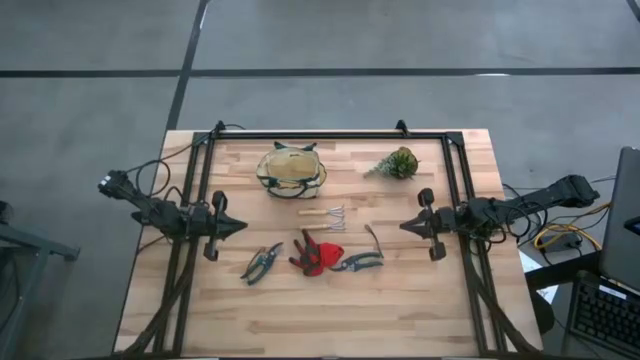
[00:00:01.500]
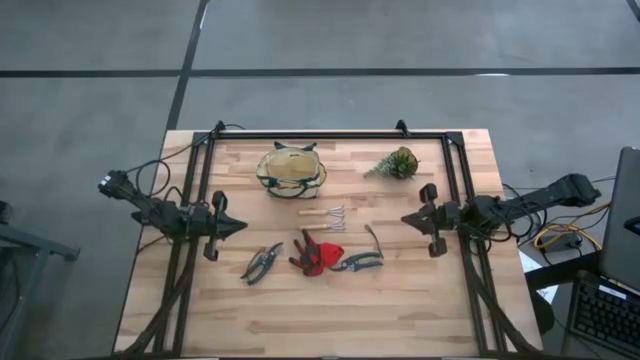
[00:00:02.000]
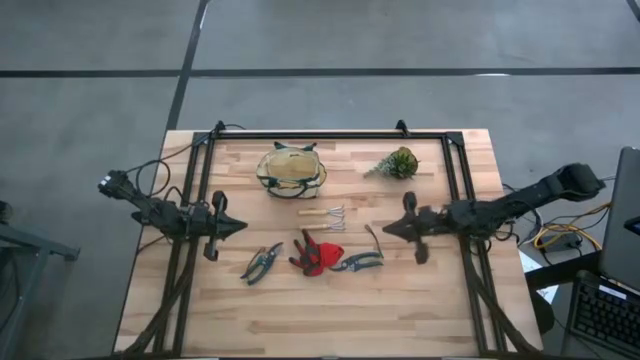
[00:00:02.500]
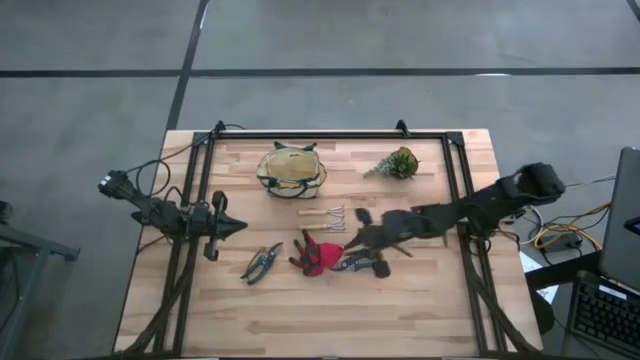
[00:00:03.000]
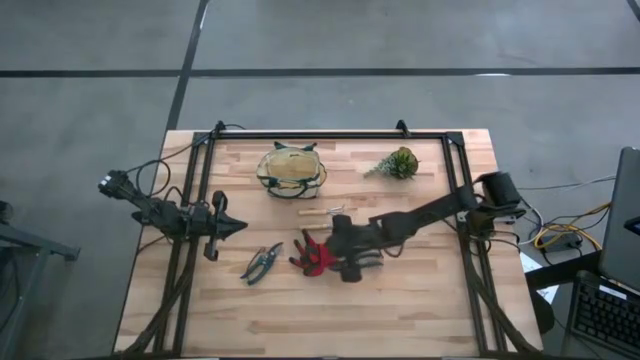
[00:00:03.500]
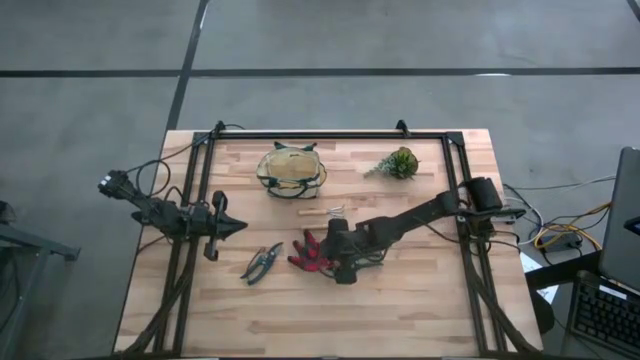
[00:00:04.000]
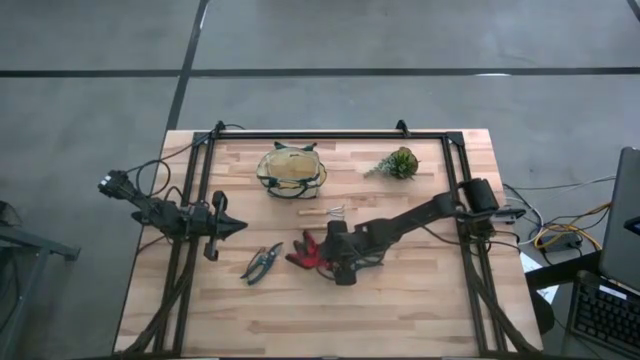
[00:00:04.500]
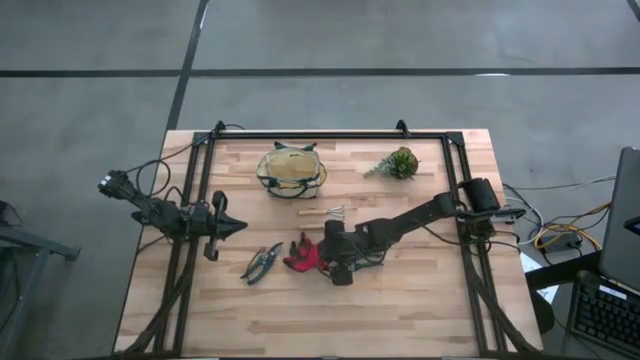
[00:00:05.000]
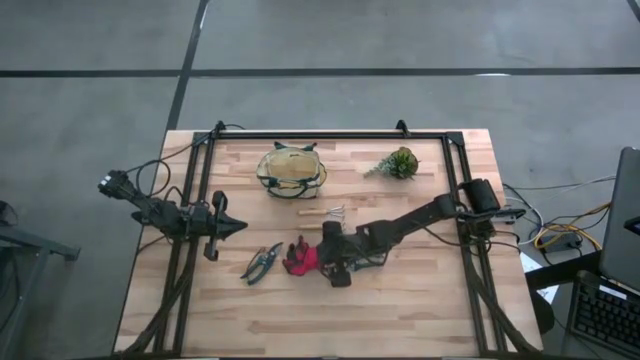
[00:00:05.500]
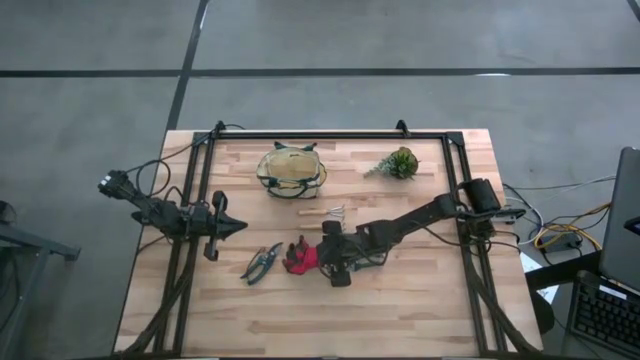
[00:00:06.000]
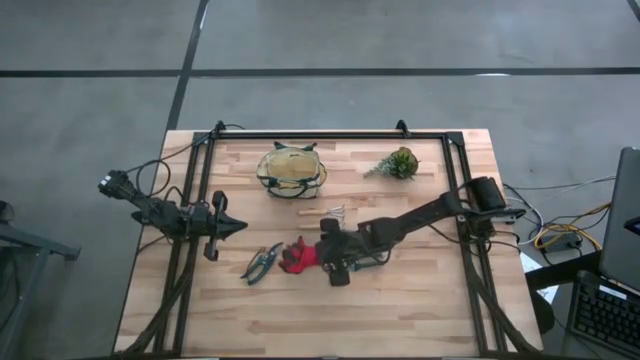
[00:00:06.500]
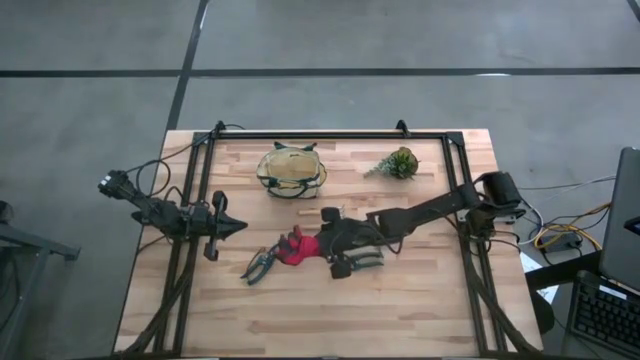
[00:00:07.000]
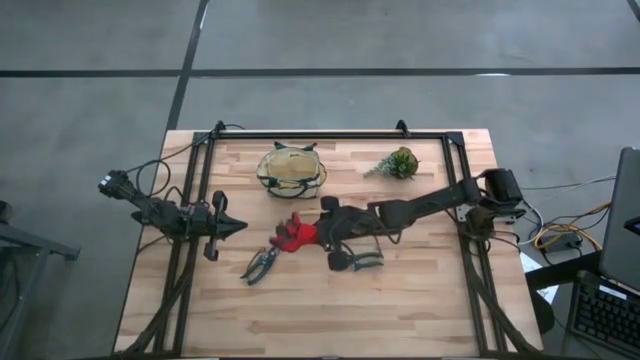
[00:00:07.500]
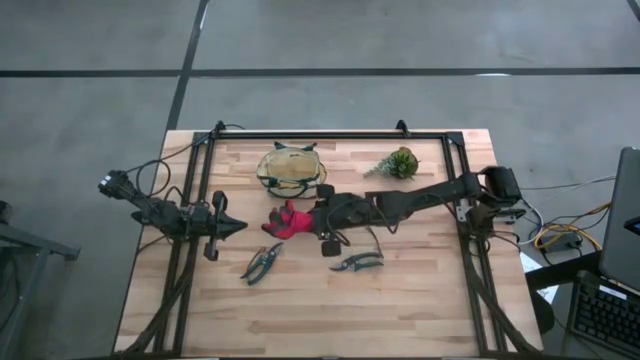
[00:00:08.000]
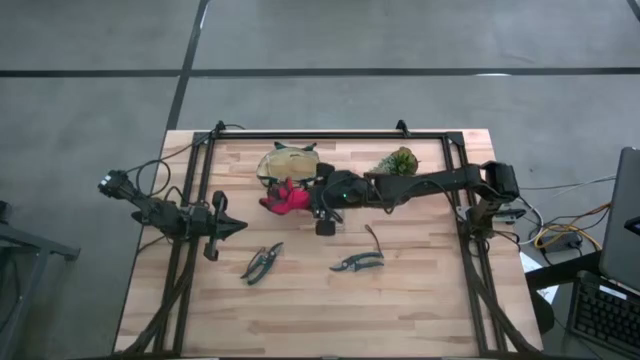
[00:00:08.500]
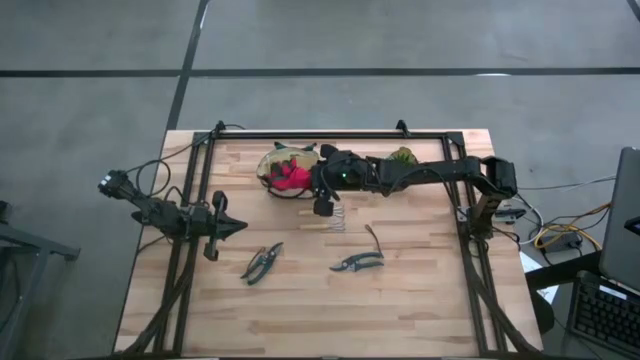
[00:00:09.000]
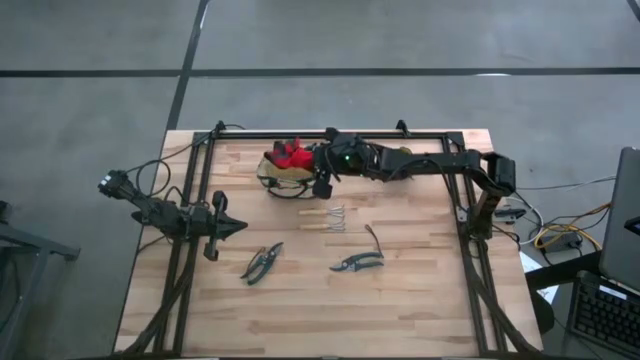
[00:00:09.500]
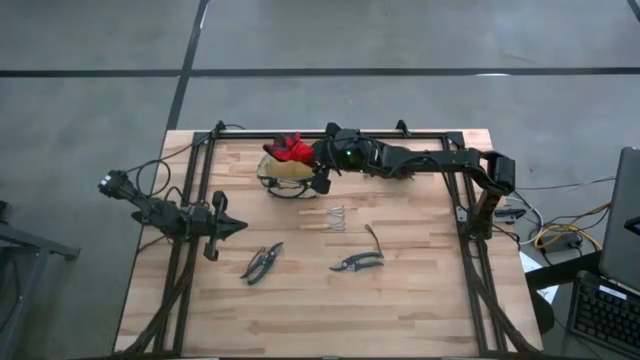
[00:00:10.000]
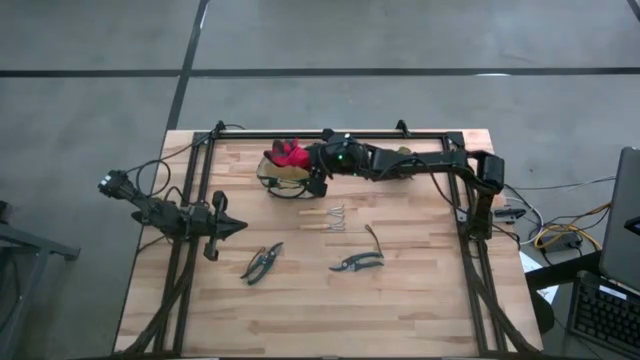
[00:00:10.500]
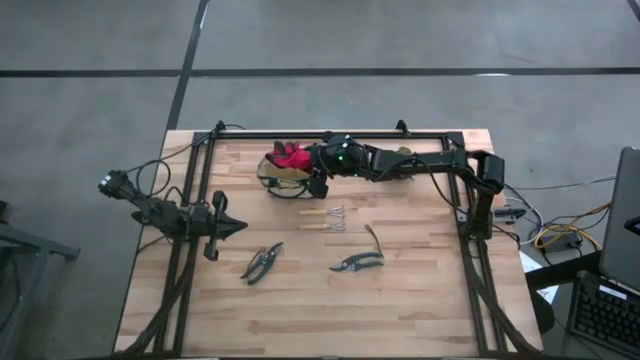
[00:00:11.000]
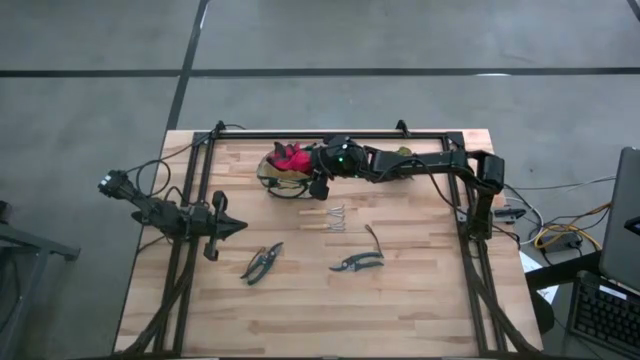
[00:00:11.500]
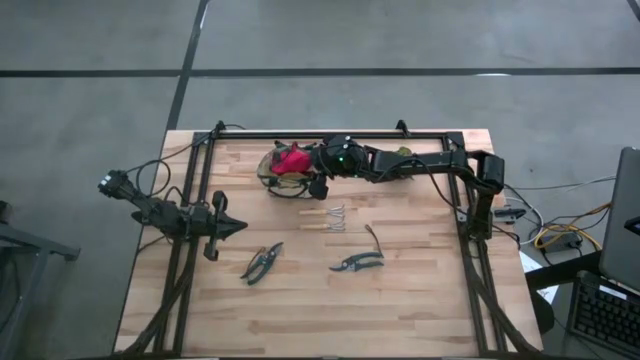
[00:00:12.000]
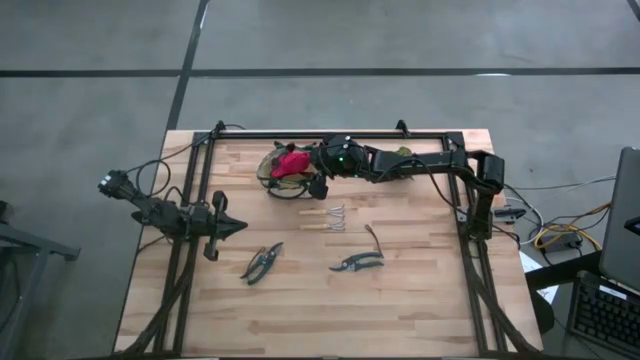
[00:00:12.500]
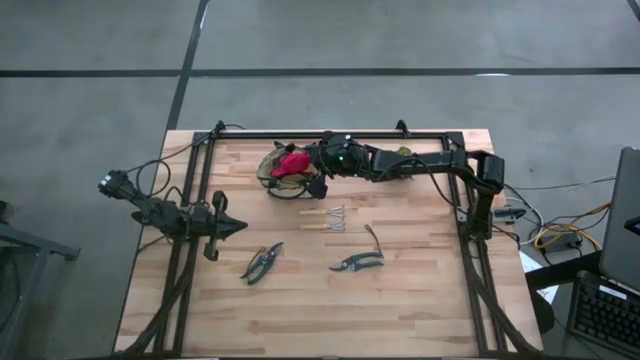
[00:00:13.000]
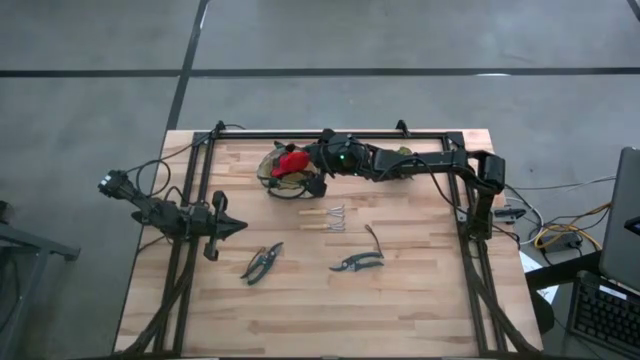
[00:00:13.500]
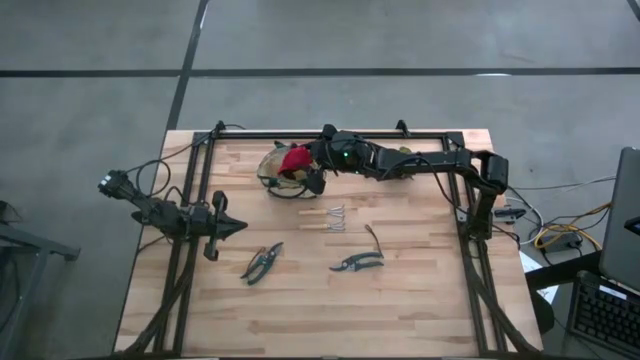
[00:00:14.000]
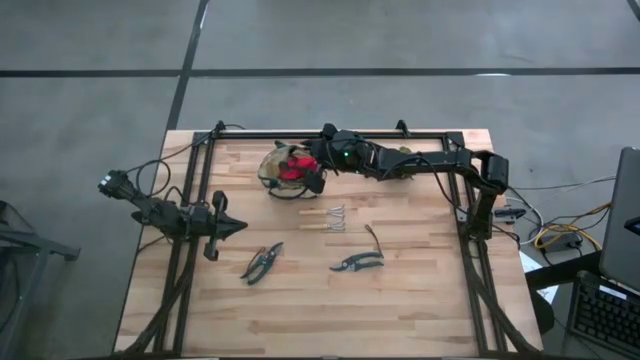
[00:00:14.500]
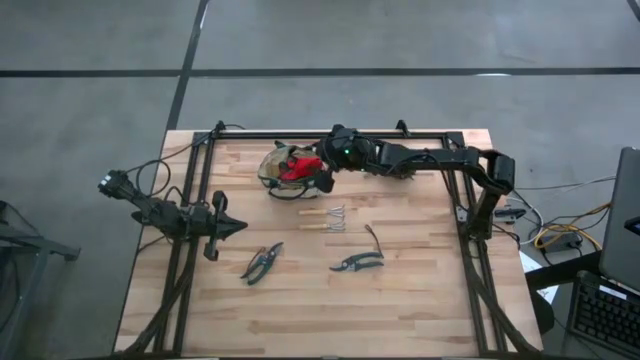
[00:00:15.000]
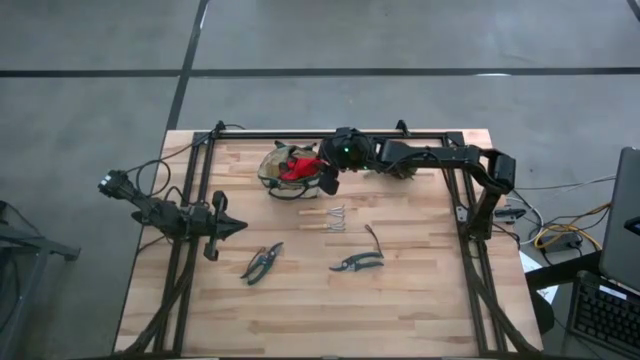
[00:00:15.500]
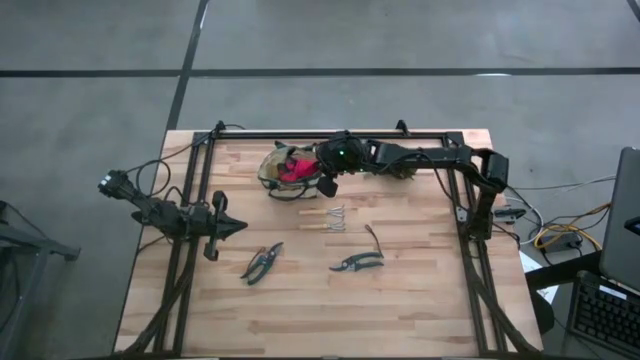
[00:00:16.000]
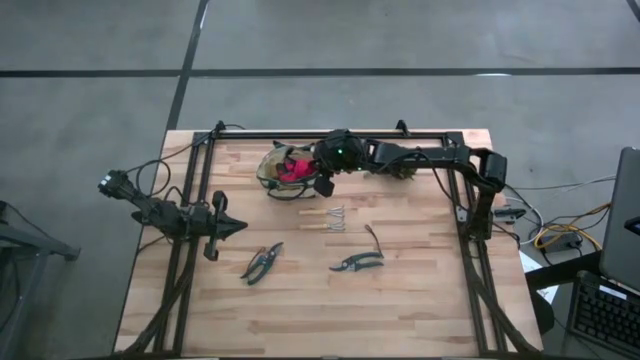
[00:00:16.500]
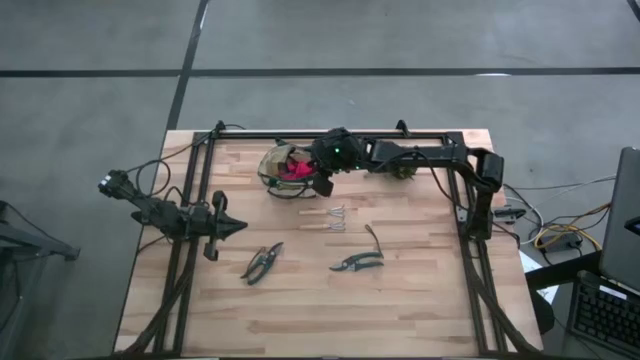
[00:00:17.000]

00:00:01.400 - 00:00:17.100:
Task: Pick & Place Garden tools in Gardening bag
Put the gloves into the gardening bag
